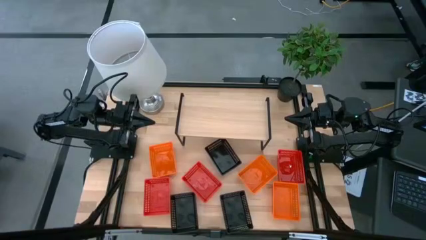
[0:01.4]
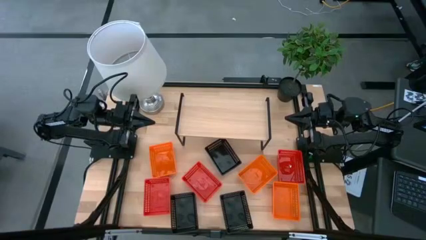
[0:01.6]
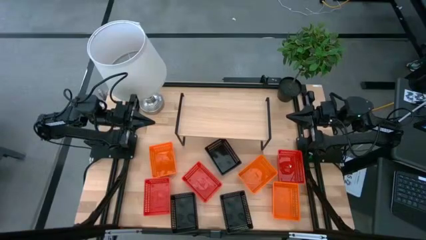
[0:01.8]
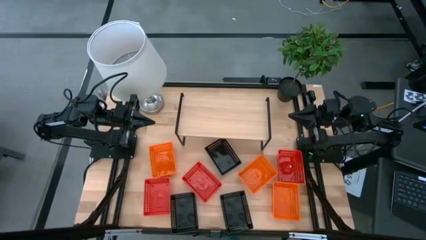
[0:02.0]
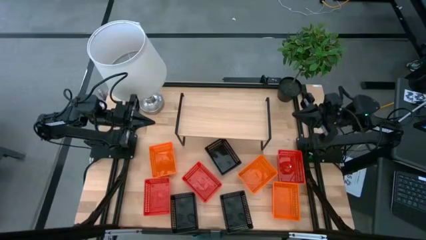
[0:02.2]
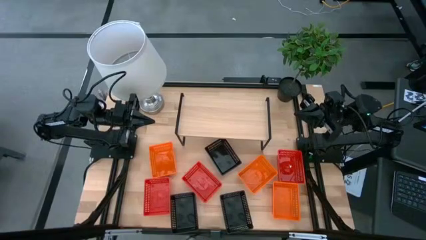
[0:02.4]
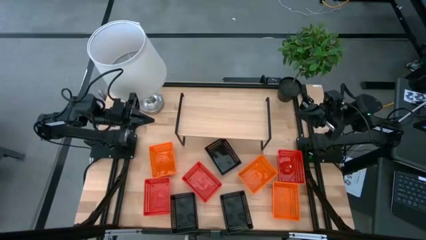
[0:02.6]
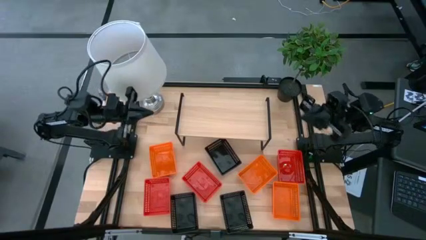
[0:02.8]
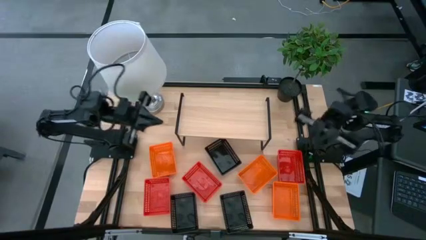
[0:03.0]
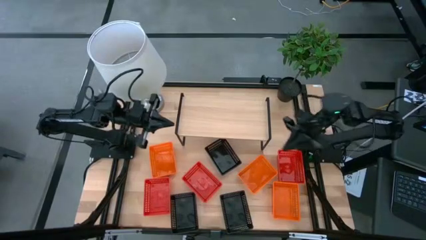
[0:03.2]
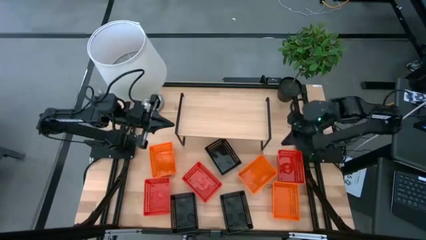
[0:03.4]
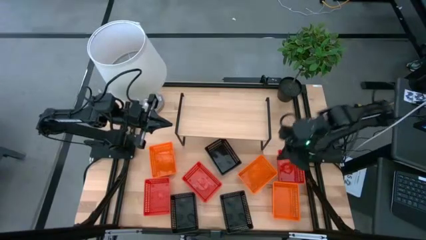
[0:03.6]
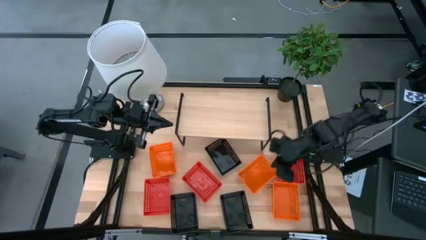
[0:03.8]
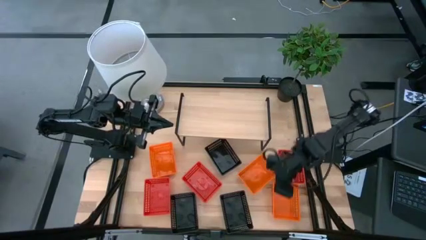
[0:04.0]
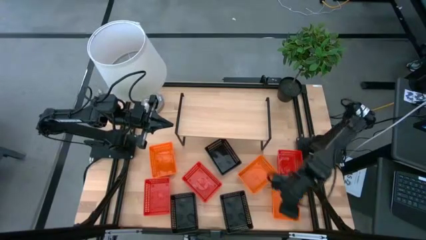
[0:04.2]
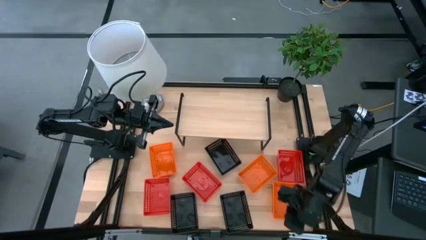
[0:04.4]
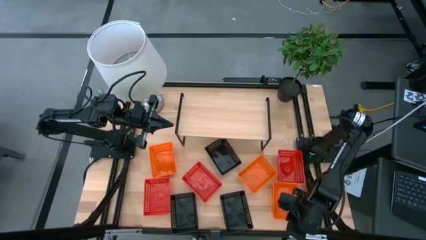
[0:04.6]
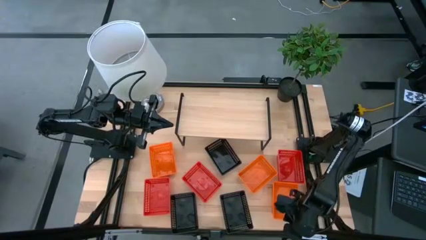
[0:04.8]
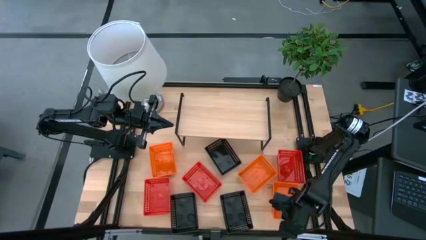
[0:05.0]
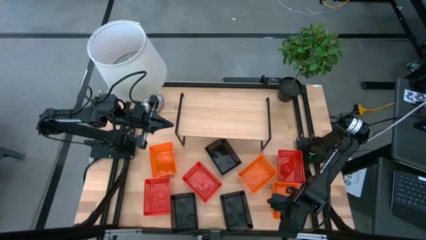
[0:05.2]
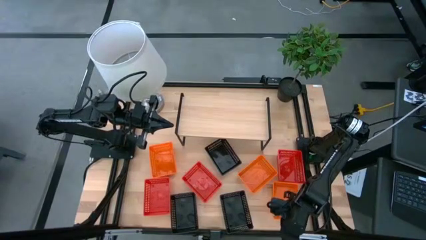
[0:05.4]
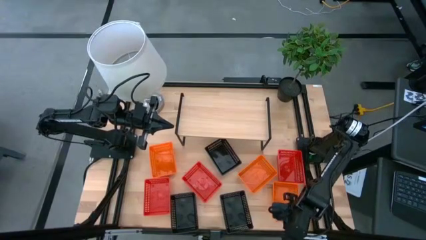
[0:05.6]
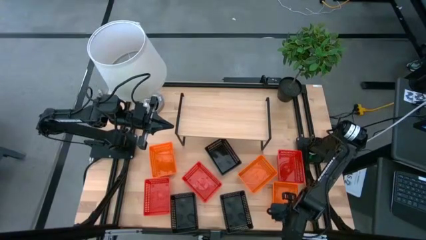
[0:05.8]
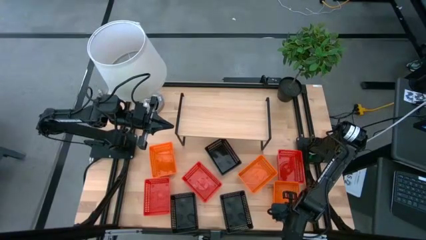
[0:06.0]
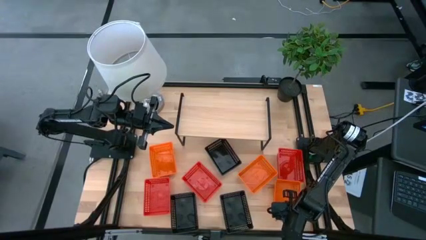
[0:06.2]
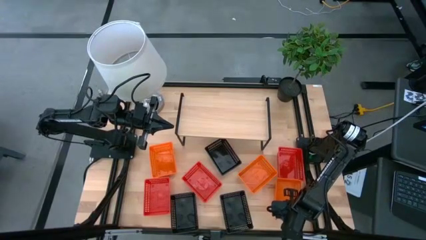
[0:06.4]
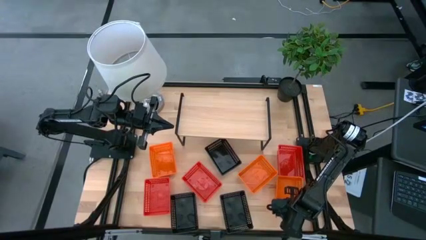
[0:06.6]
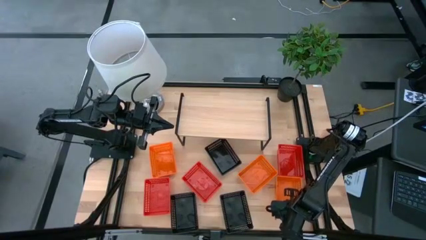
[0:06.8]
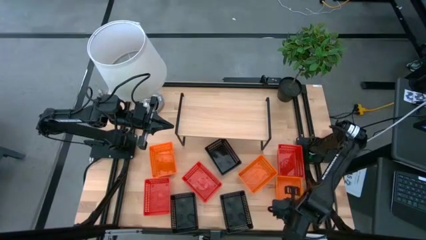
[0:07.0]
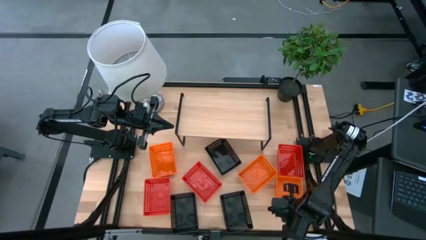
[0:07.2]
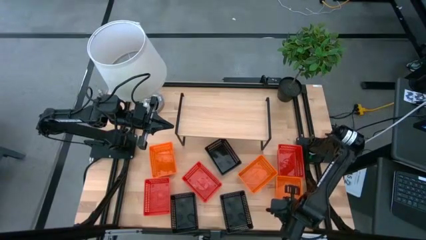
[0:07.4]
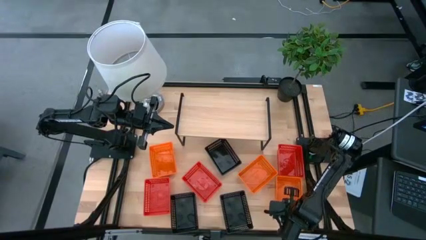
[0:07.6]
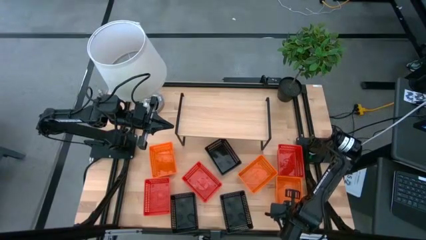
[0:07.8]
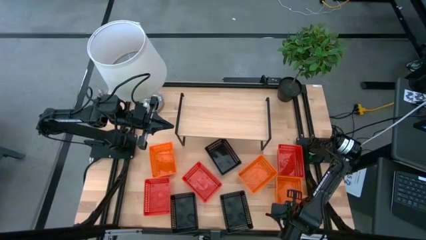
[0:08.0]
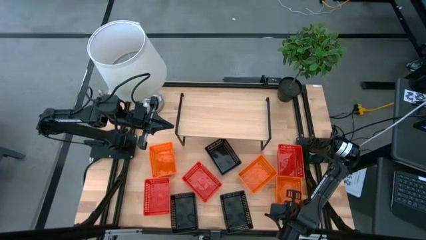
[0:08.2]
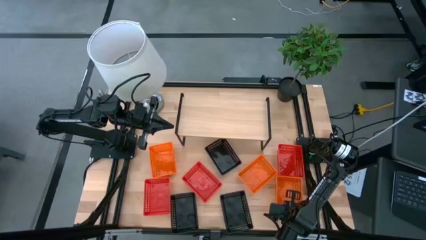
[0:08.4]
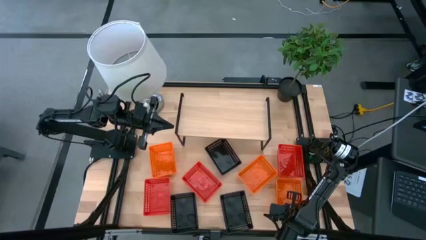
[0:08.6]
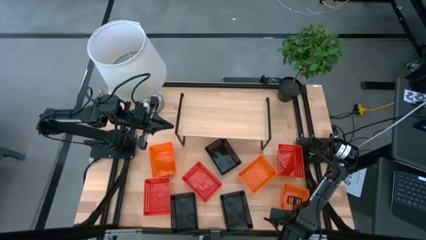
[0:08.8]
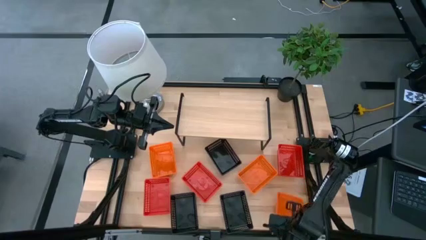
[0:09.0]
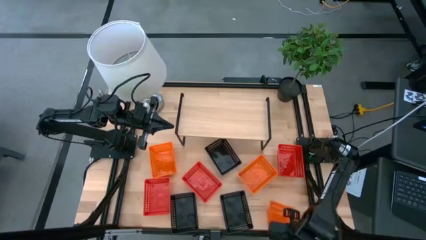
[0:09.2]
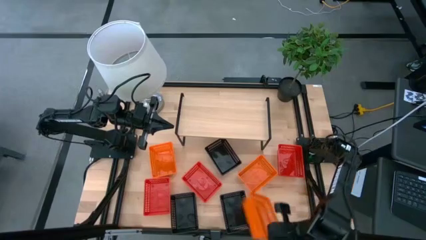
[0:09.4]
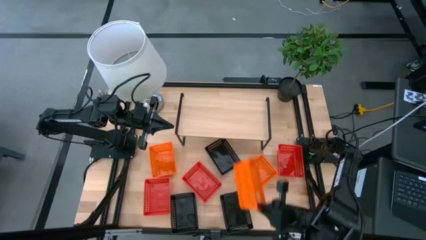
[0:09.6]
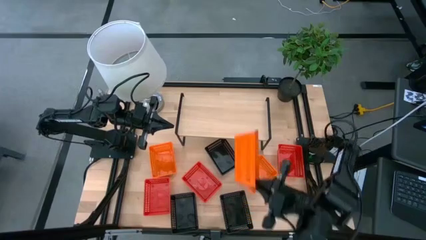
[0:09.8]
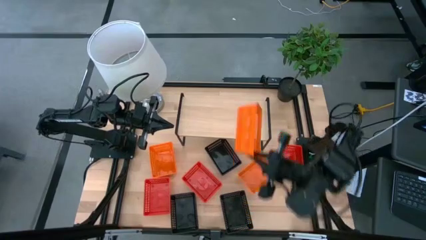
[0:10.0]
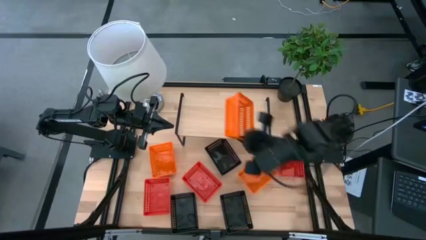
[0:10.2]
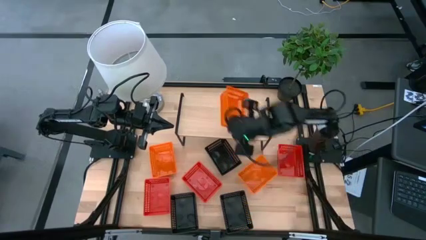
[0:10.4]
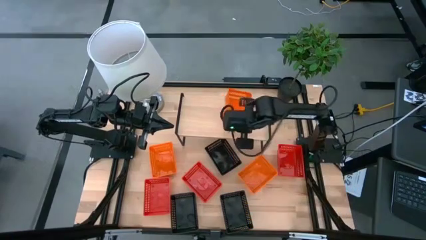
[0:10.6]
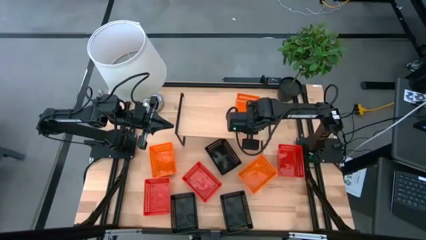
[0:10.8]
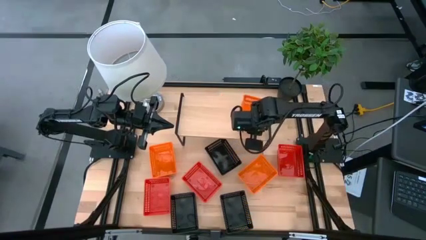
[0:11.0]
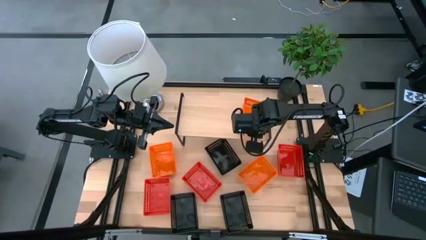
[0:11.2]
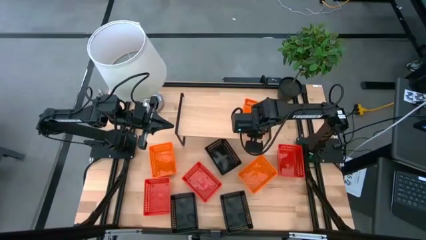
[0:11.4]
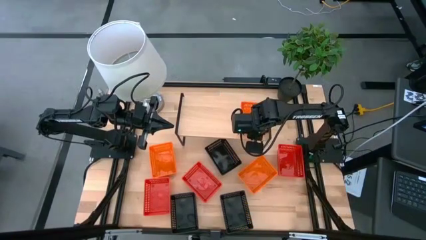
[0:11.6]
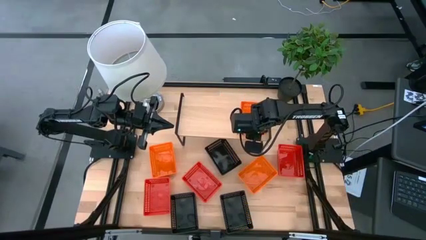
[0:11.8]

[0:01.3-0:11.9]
Task: Stack baskets on shelf by color
Put the bottom right orange bin on the shelf

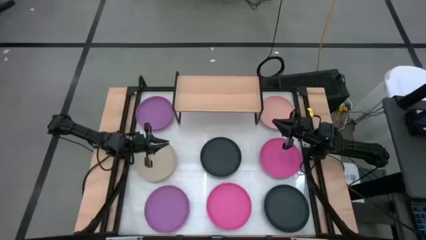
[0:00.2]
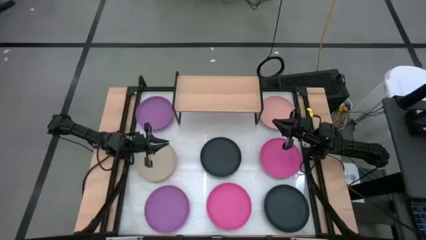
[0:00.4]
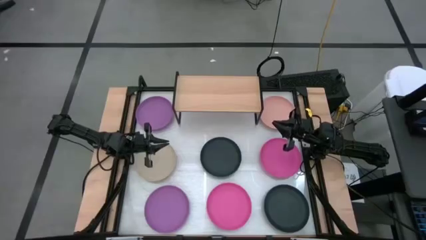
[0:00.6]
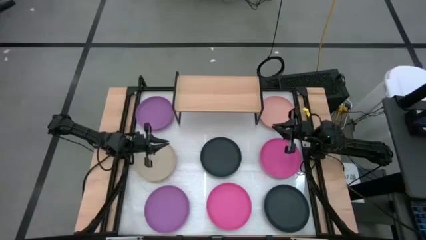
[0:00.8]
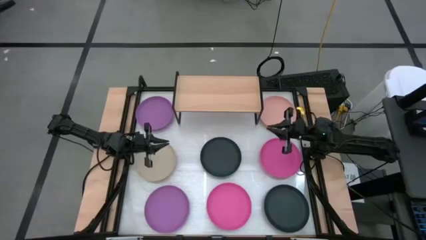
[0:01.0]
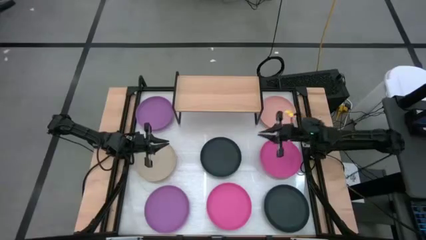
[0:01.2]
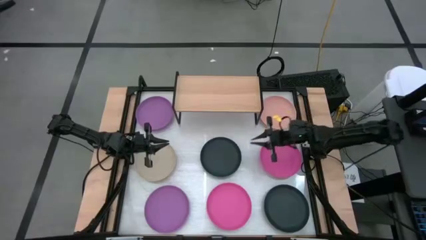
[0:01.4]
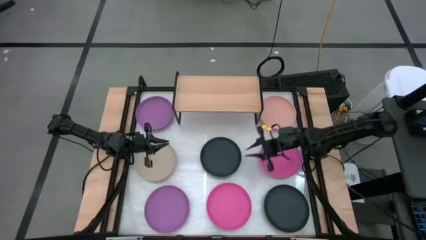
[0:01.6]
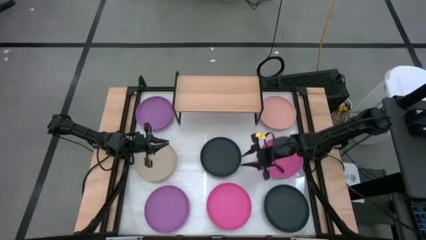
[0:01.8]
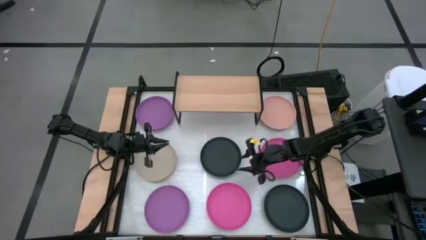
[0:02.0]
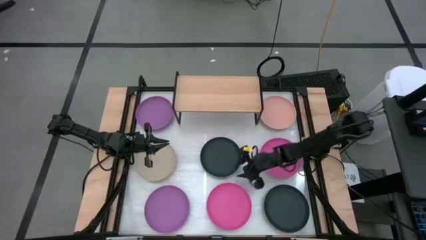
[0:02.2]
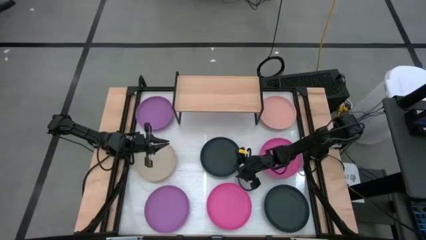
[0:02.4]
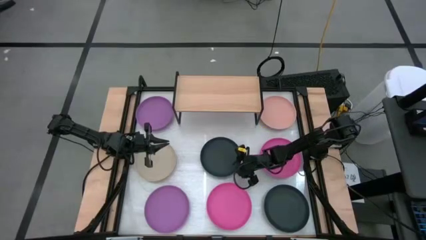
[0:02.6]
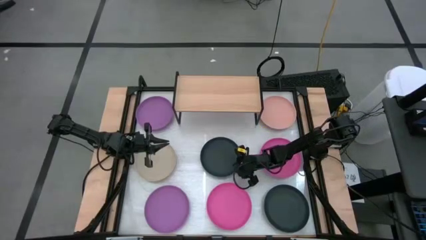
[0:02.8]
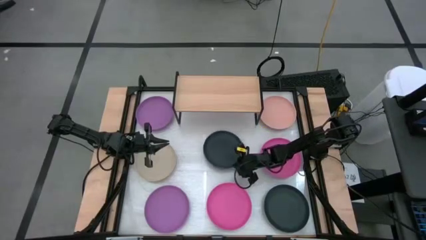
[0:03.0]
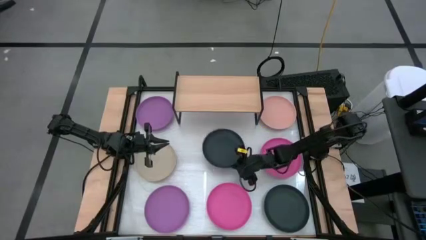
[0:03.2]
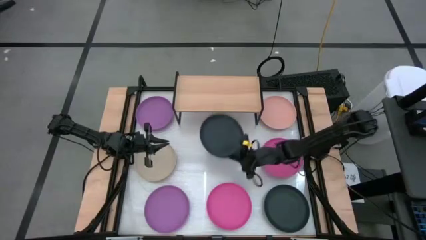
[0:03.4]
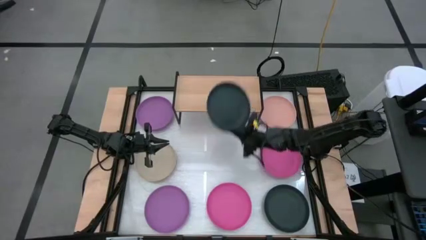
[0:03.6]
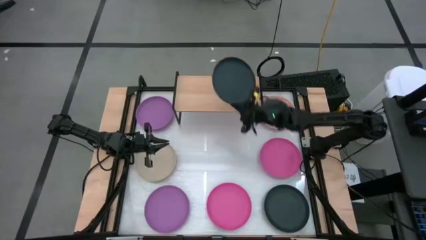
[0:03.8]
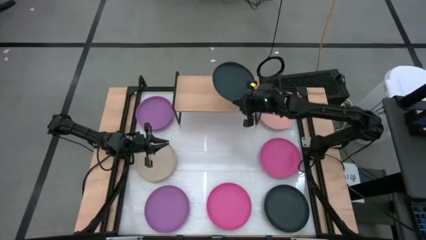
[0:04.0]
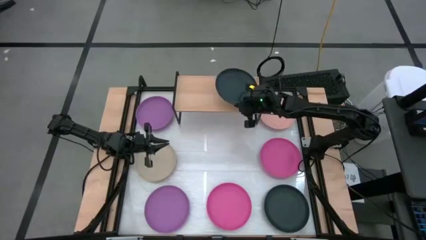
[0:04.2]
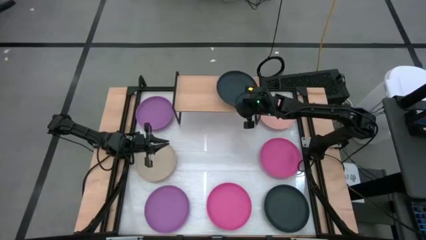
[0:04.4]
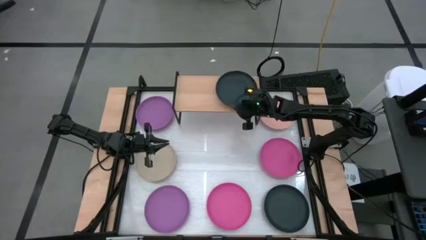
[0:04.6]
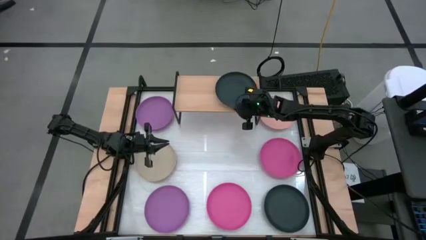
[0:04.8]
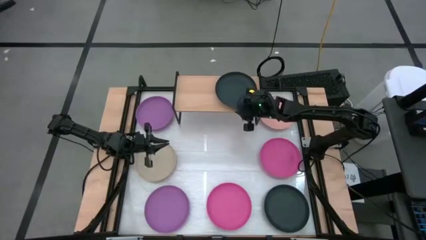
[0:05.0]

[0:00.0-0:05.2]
Task: Place and stack plates onto a shelf
Put the top black plate on the shelf
